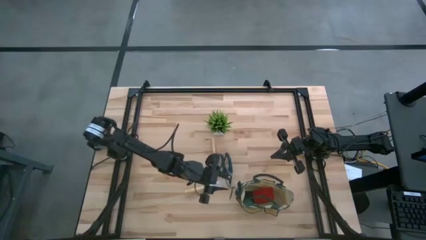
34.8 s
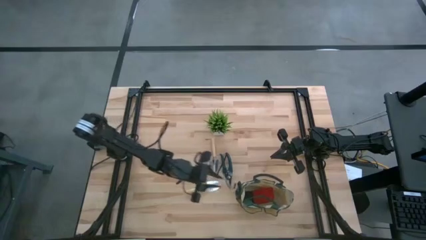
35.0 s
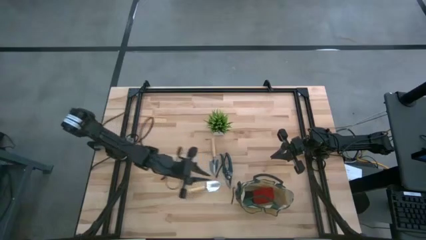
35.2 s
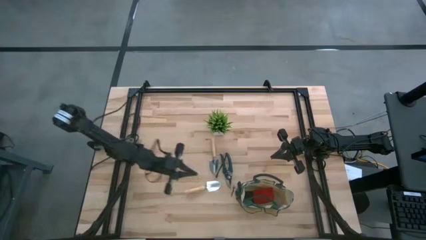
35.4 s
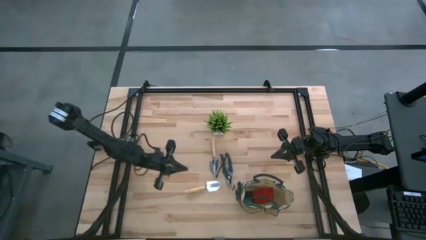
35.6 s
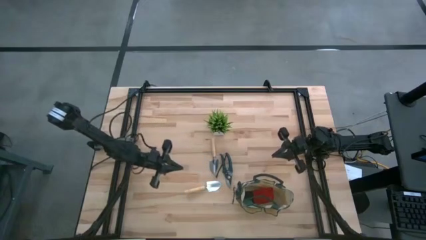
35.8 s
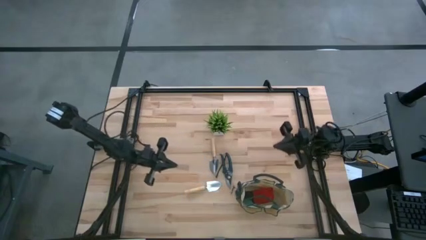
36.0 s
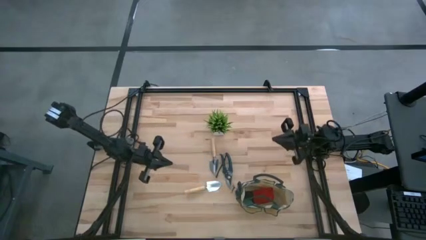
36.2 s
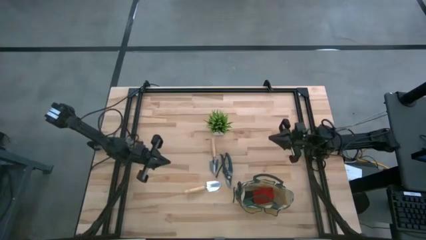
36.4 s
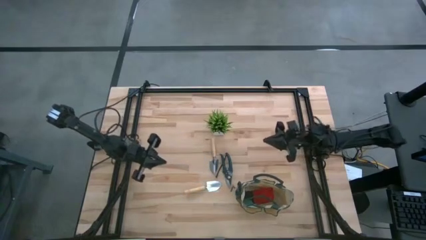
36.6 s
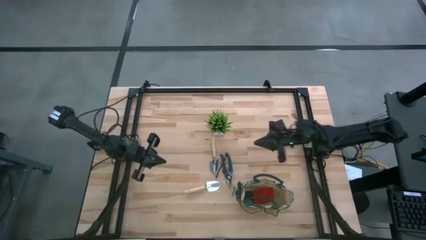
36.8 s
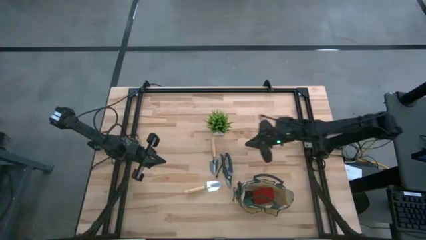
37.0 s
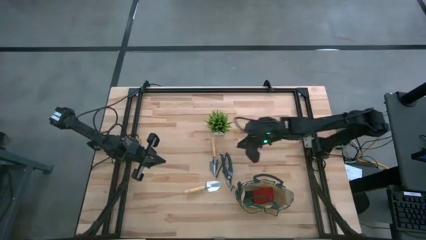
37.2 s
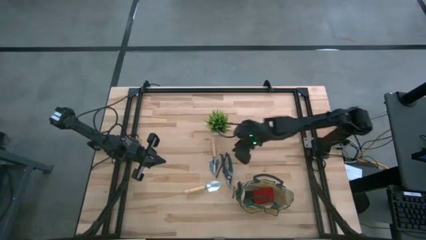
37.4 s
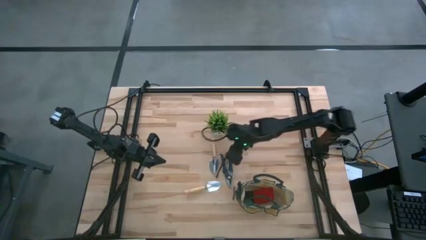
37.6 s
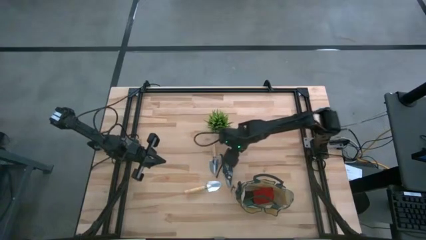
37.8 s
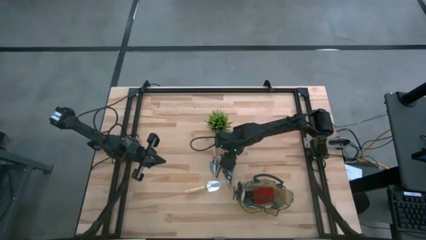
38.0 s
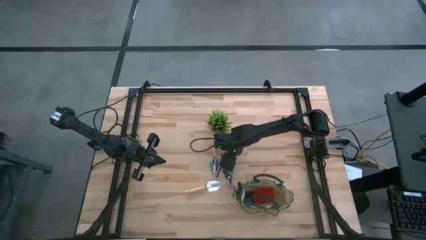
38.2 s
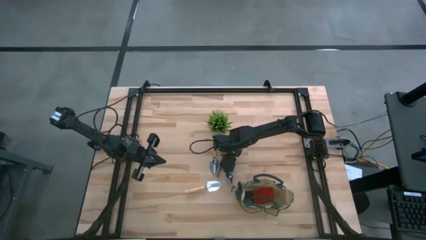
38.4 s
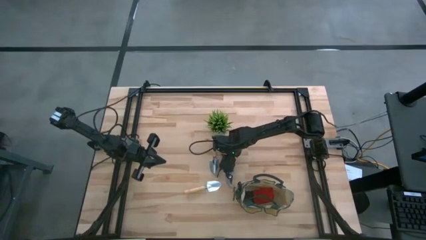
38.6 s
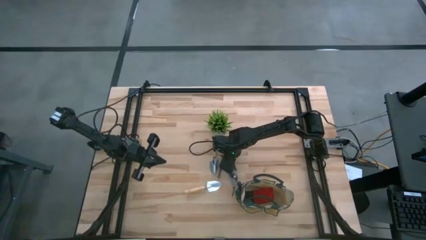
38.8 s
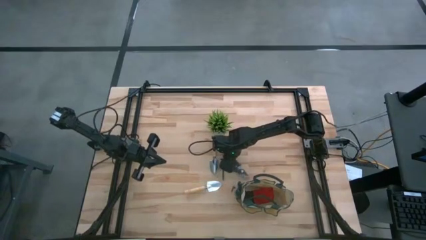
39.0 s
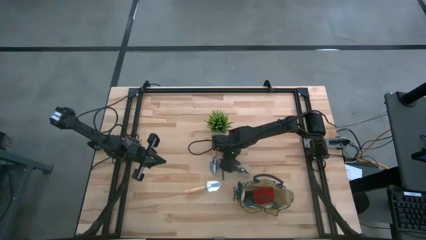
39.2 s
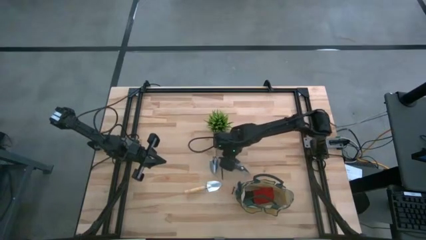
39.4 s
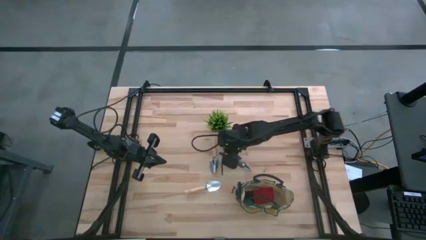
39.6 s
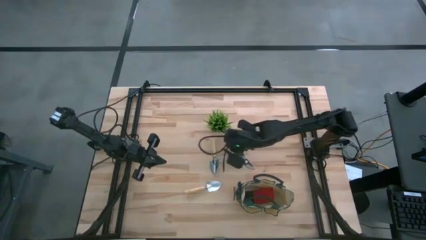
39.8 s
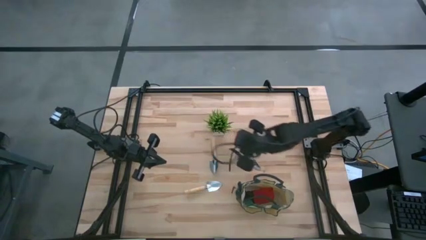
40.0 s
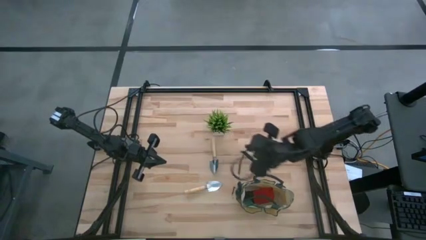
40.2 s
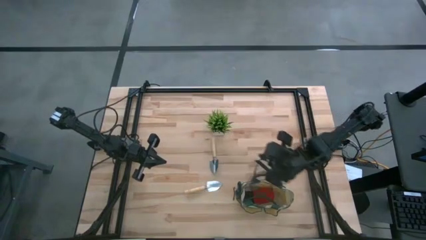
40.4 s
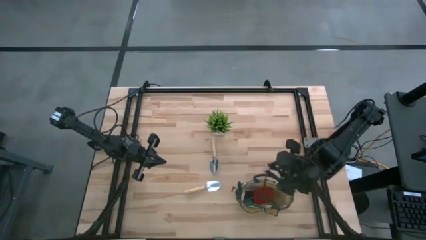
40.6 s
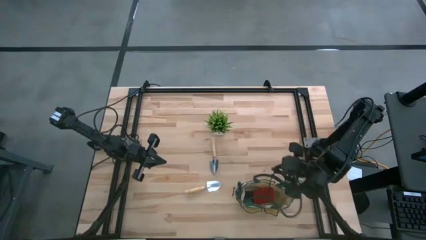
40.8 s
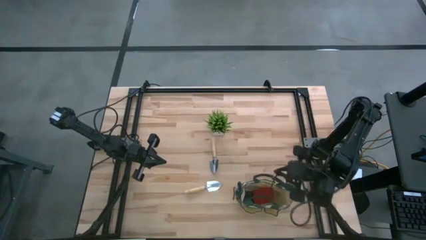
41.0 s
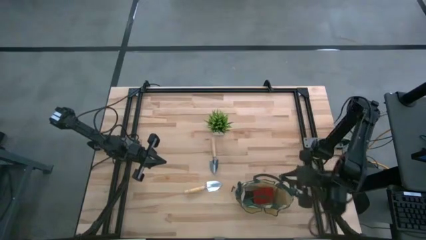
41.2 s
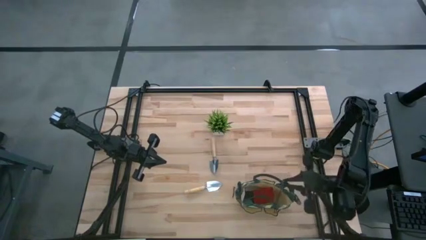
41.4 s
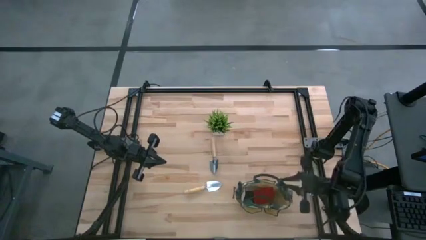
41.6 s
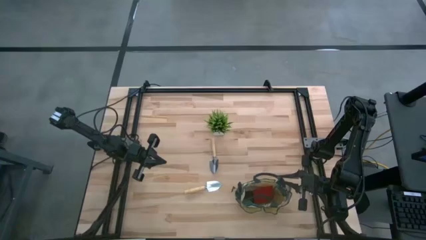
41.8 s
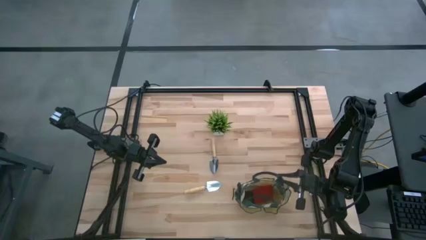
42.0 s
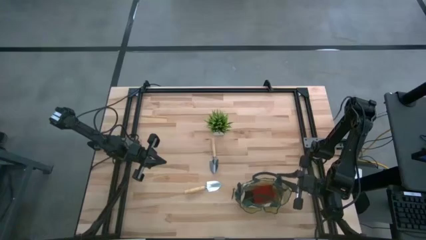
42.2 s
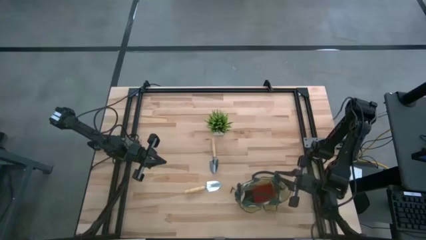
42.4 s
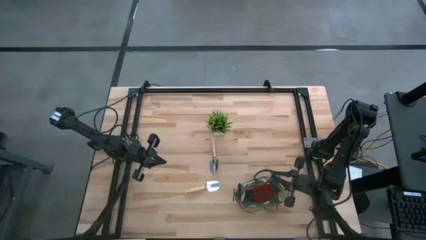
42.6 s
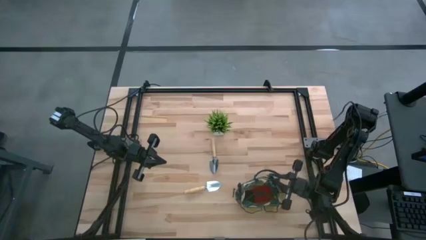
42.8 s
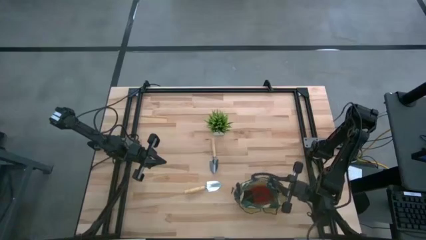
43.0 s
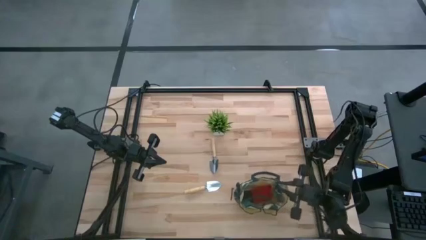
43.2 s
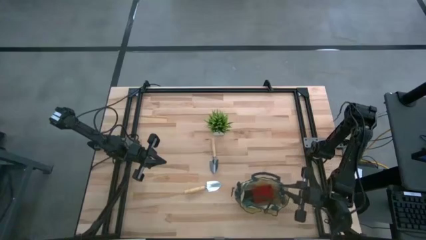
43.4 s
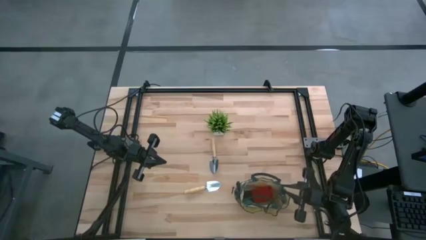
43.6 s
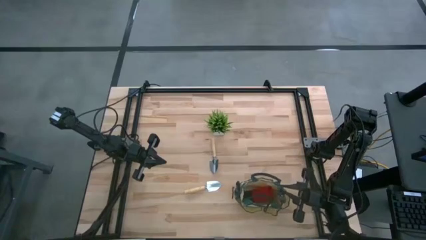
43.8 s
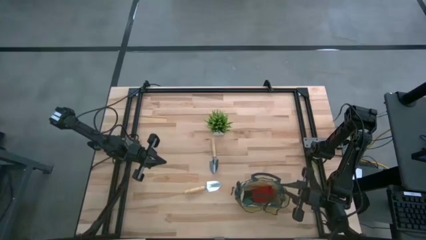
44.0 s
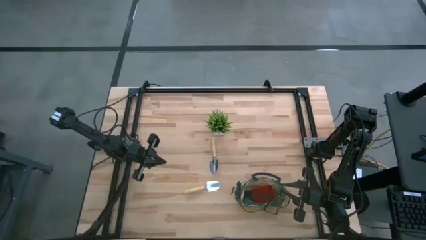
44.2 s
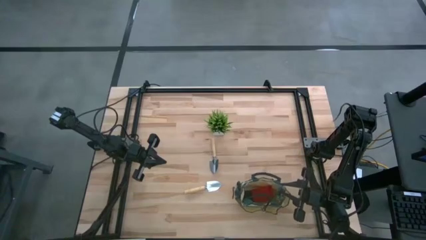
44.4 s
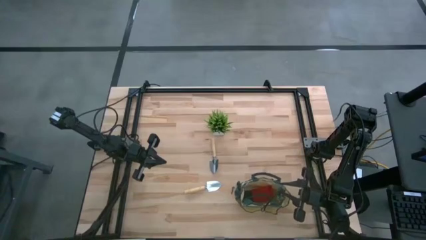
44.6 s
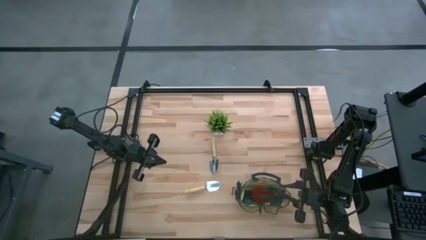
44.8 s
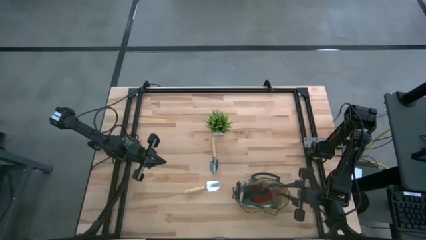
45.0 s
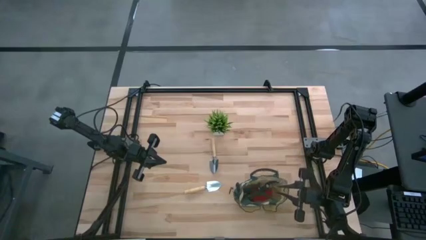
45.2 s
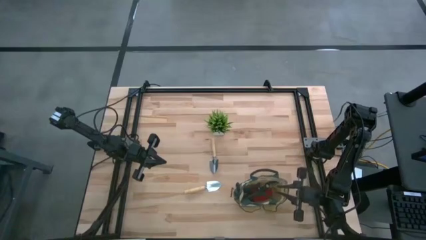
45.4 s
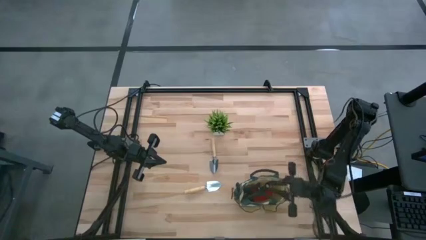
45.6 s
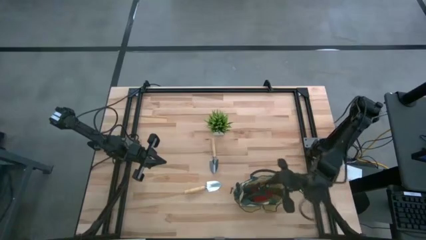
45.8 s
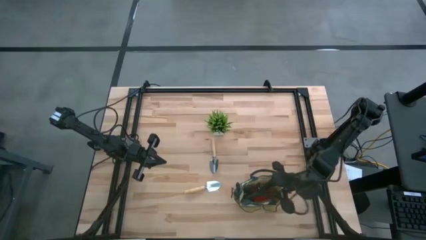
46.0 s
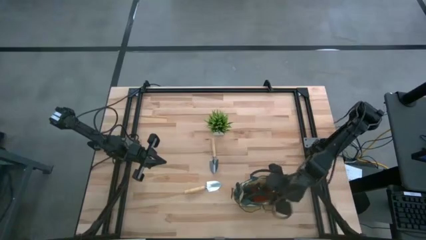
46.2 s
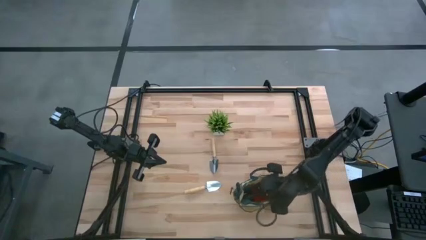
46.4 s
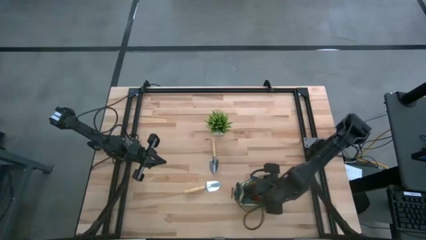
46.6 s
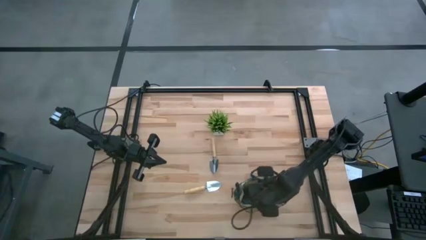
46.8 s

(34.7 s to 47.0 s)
Task: Pick & Place Garden tools in Gardening bag
Put the green shear scissors into the green gardening bag

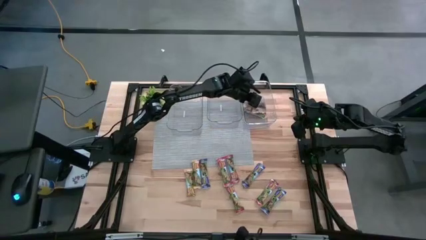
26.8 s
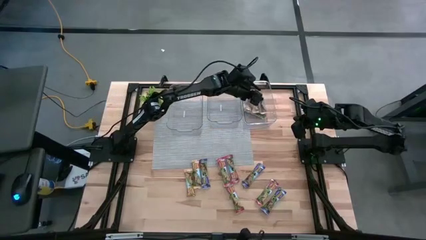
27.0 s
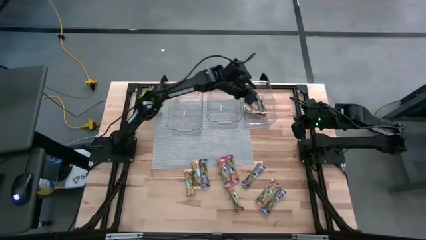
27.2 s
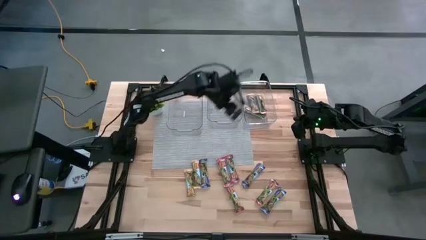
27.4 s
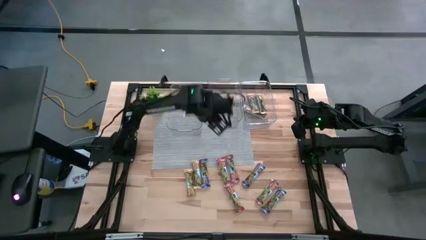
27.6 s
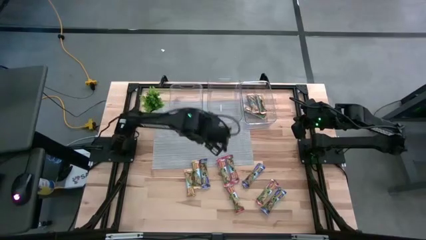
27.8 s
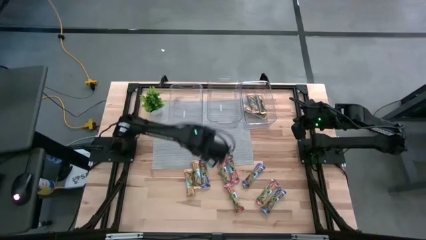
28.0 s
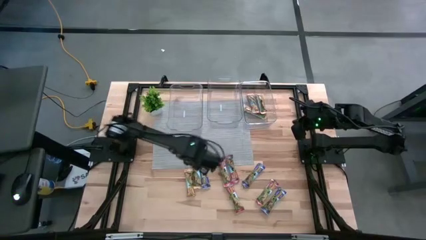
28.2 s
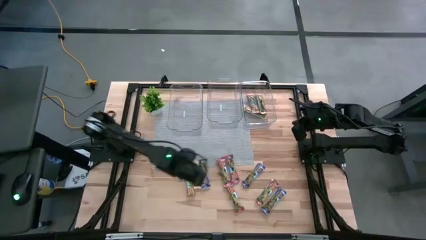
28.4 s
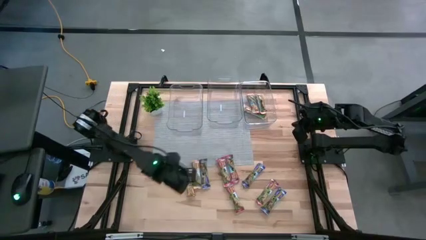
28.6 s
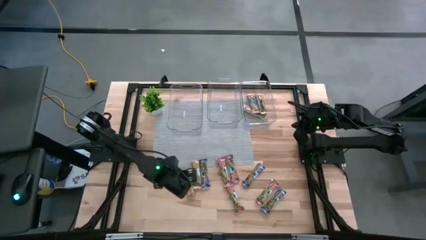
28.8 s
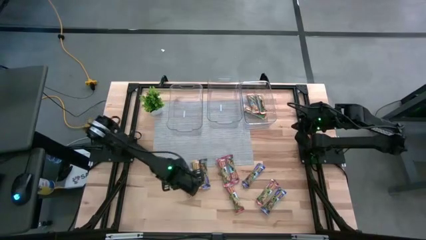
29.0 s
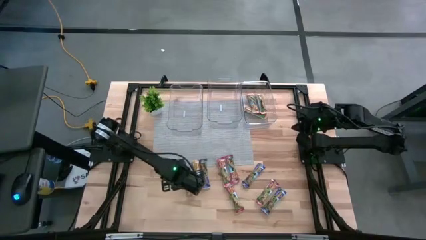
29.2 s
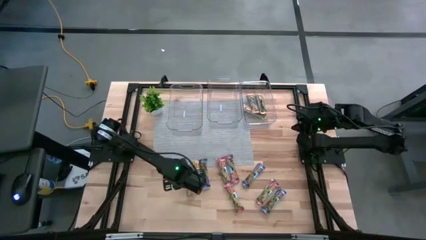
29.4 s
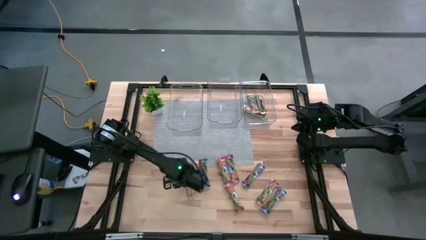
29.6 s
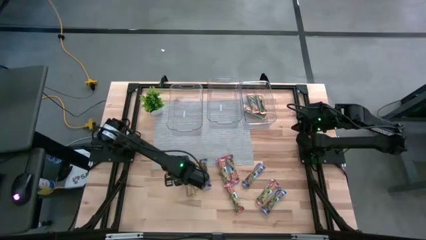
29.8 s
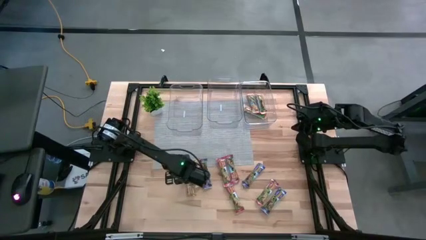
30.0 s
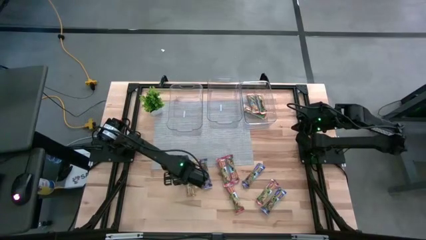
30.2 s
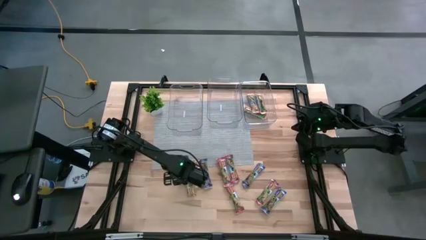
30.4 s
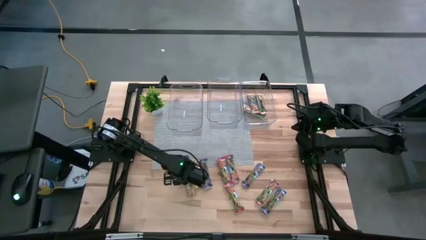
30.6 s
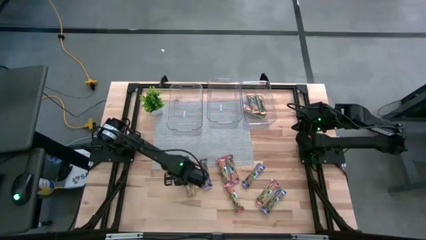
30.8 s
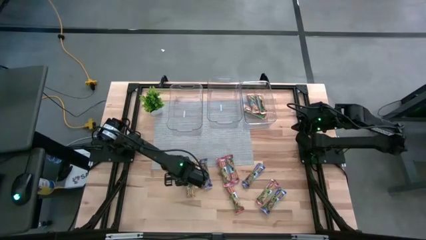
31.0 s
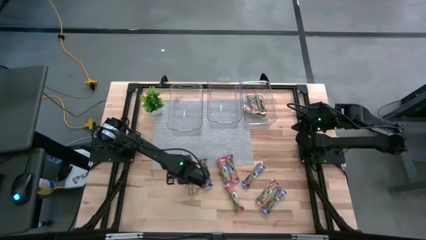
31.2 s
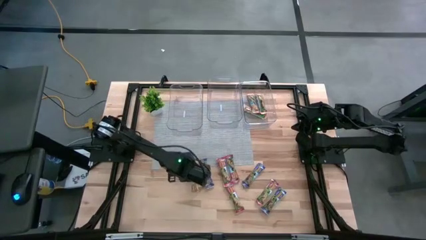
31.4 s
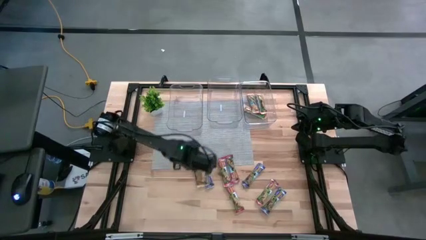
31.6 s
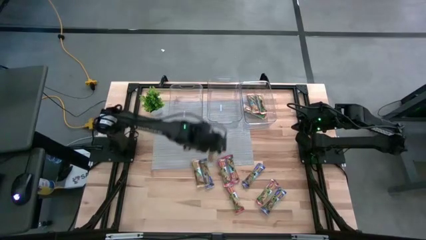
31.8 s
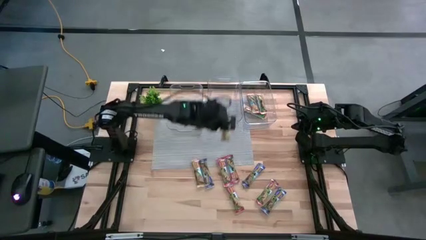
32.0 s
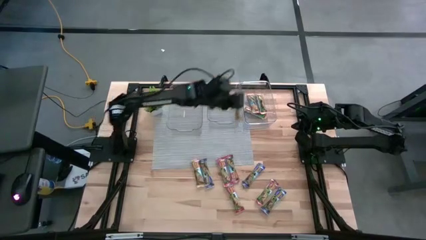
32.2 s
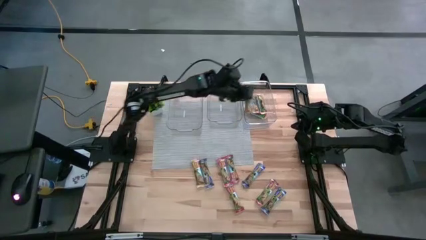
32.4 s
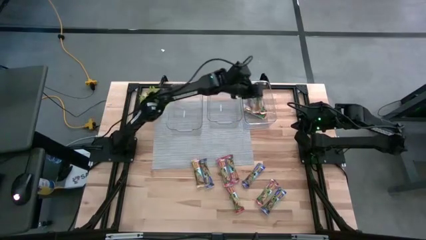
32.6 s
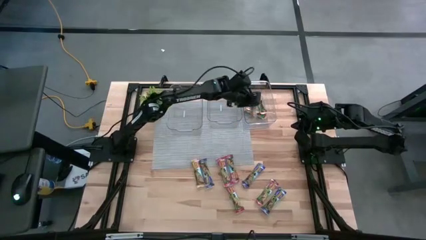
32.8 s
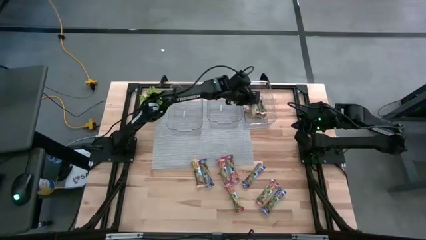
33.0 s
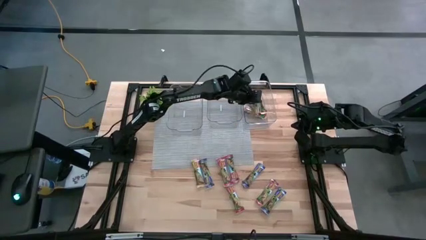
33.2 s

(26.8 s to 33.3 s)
Task: Pick and place Granola Bars by type
Put the yellow granola bar into the right transparent bin
